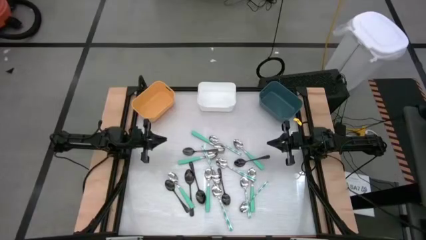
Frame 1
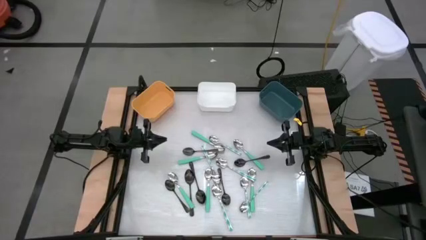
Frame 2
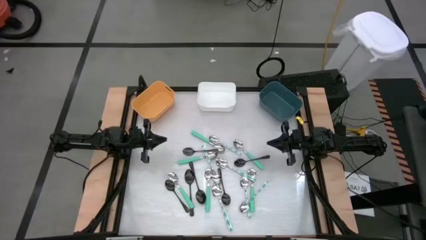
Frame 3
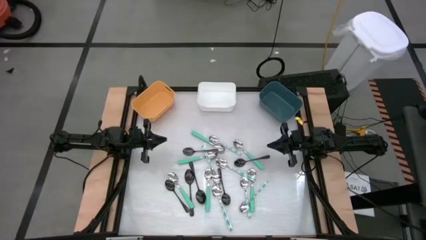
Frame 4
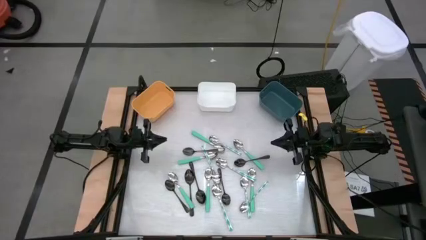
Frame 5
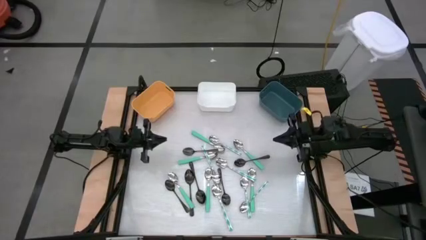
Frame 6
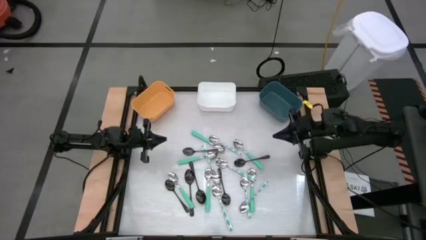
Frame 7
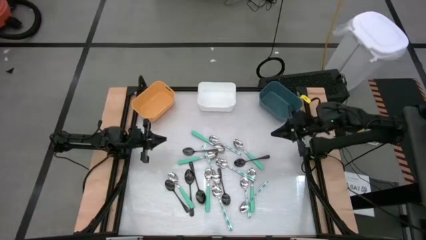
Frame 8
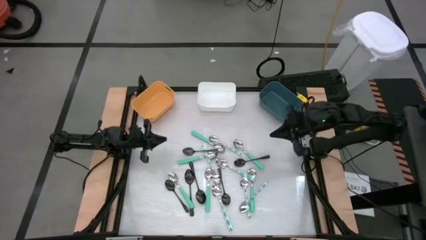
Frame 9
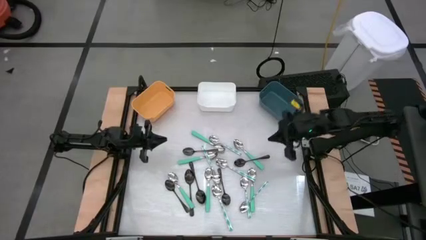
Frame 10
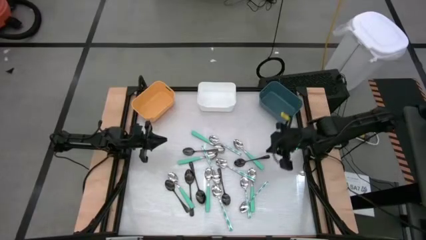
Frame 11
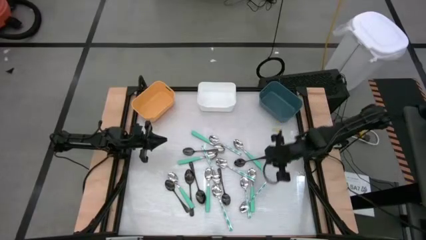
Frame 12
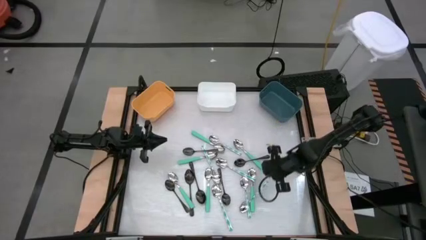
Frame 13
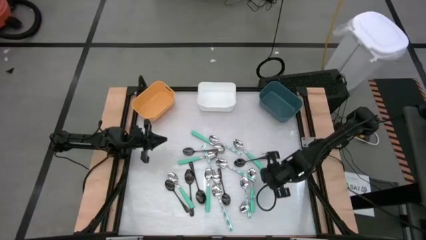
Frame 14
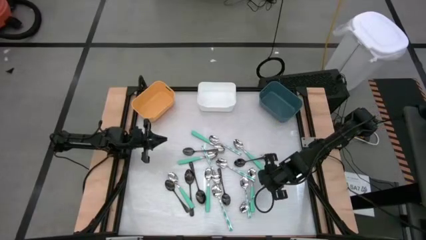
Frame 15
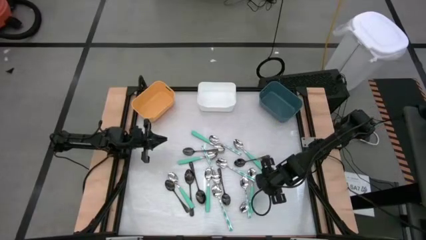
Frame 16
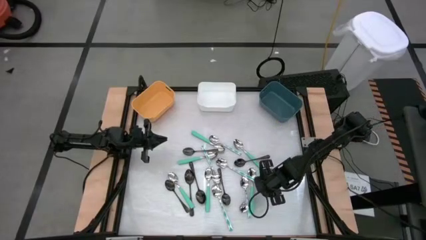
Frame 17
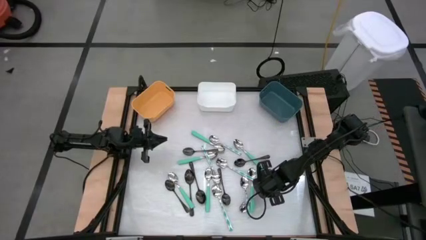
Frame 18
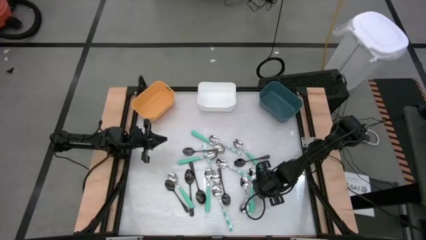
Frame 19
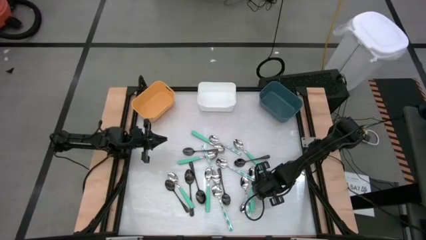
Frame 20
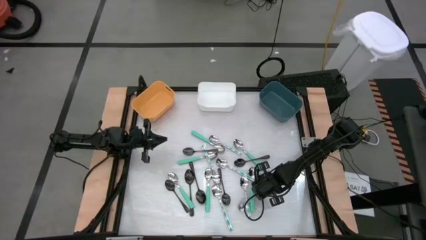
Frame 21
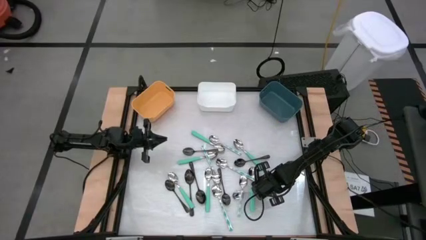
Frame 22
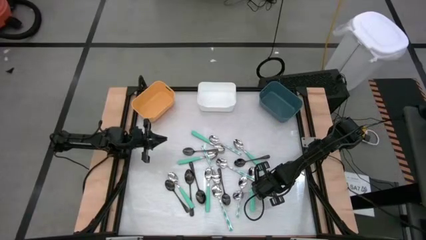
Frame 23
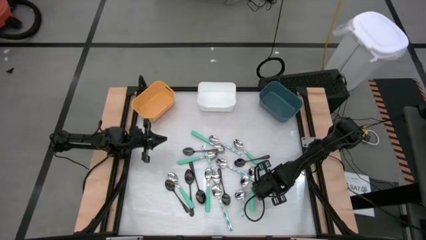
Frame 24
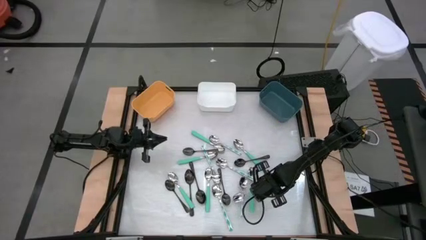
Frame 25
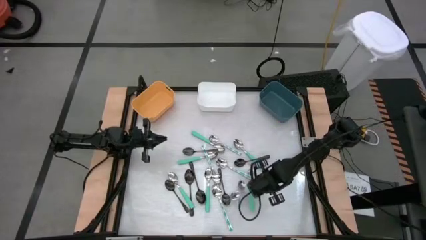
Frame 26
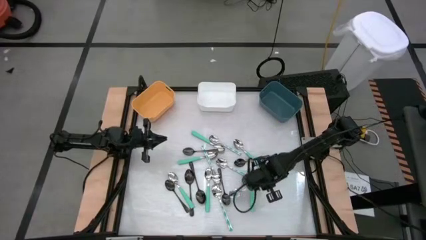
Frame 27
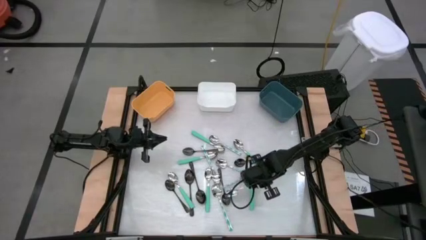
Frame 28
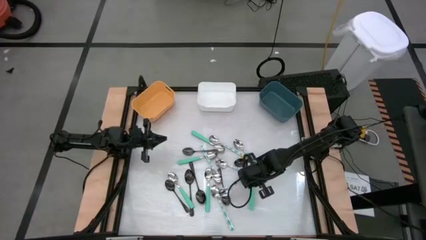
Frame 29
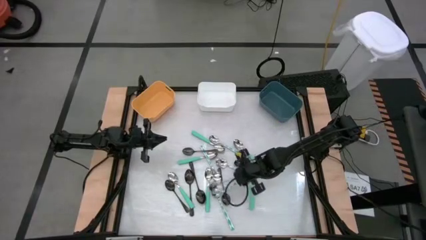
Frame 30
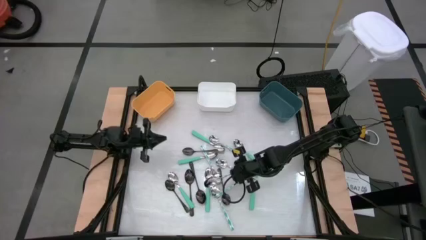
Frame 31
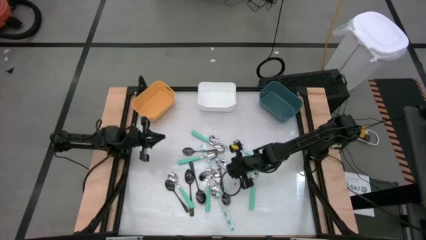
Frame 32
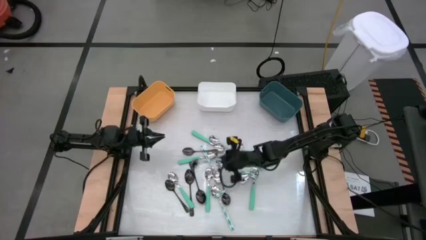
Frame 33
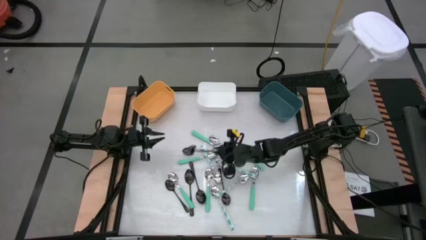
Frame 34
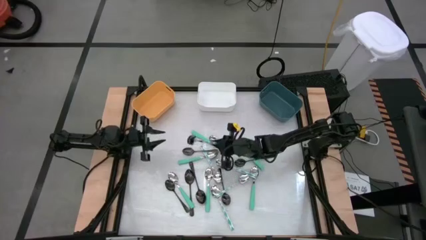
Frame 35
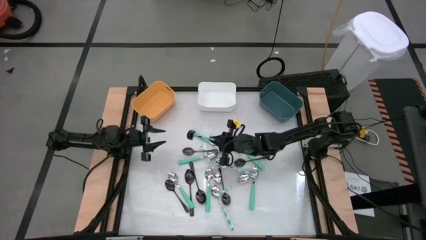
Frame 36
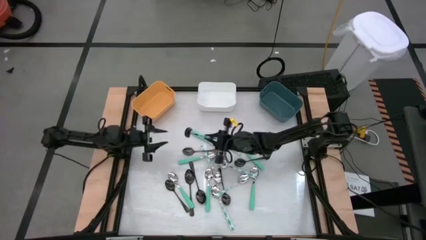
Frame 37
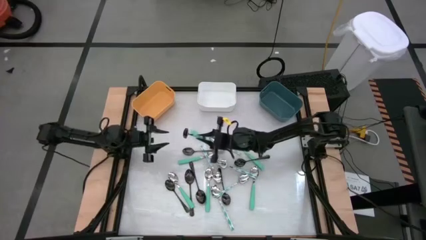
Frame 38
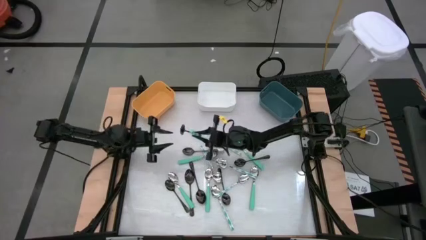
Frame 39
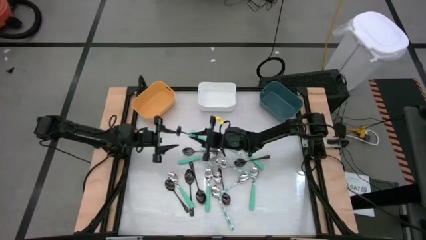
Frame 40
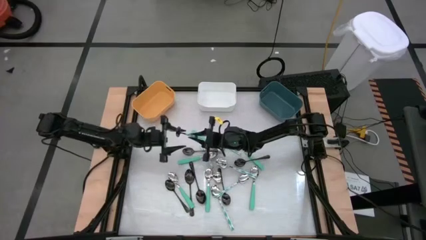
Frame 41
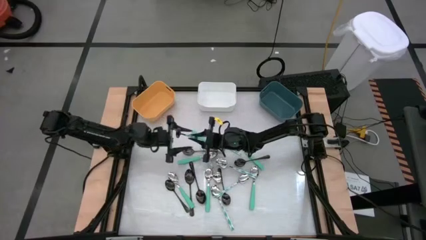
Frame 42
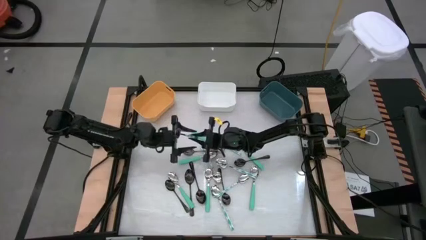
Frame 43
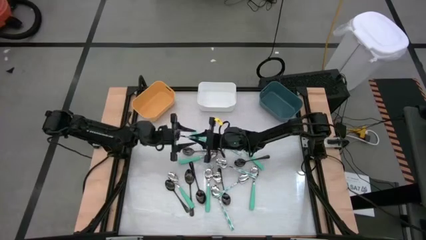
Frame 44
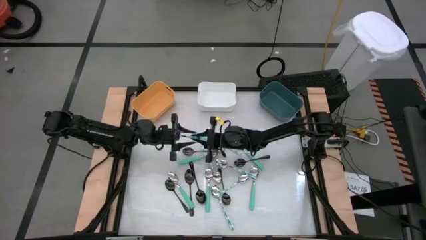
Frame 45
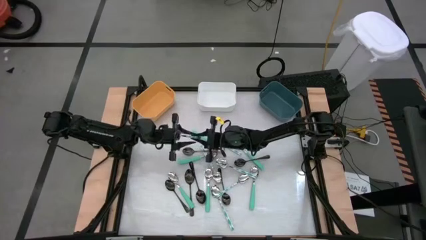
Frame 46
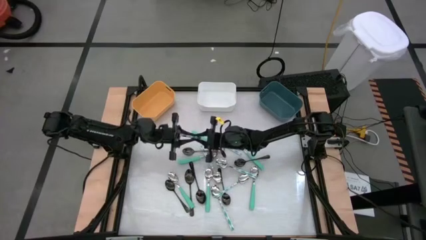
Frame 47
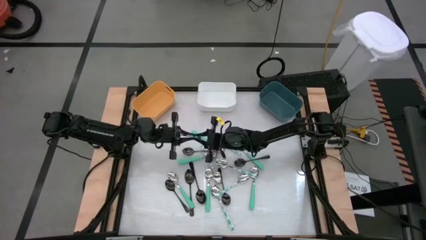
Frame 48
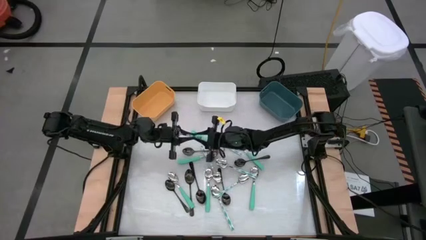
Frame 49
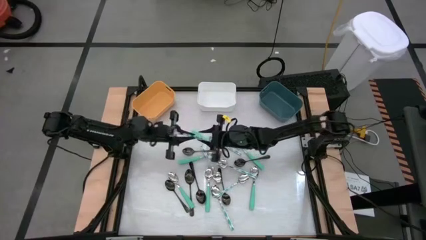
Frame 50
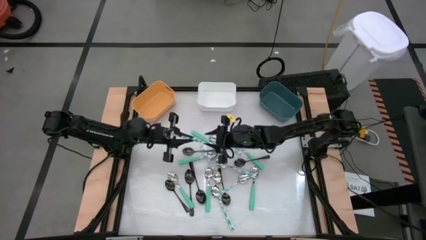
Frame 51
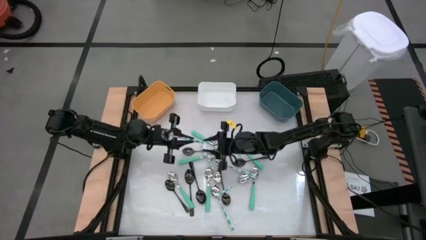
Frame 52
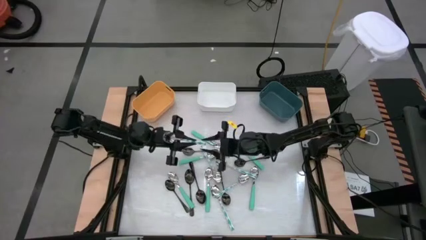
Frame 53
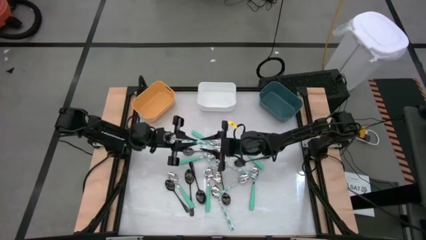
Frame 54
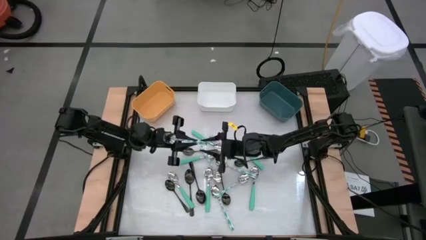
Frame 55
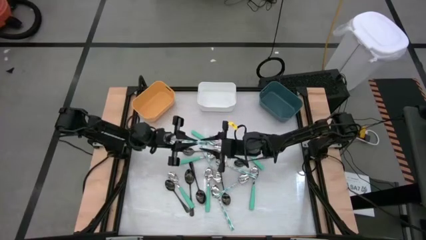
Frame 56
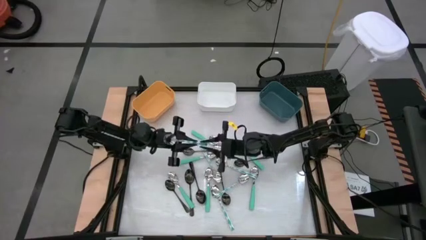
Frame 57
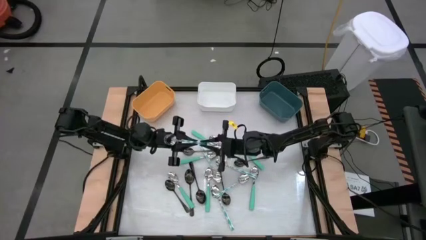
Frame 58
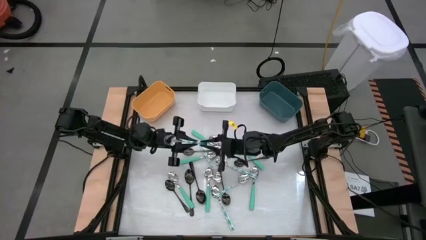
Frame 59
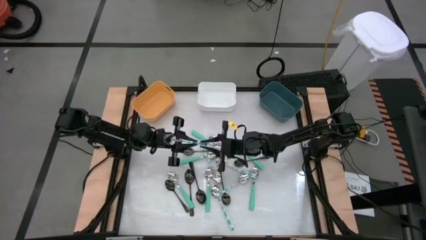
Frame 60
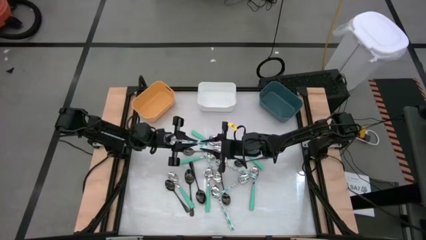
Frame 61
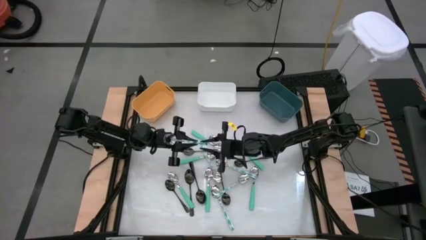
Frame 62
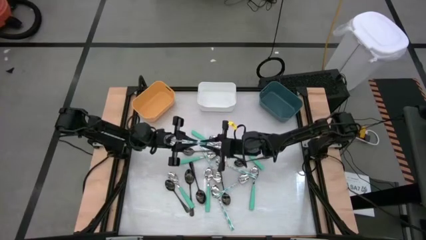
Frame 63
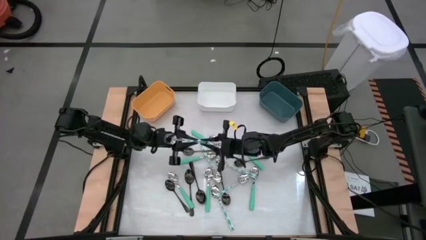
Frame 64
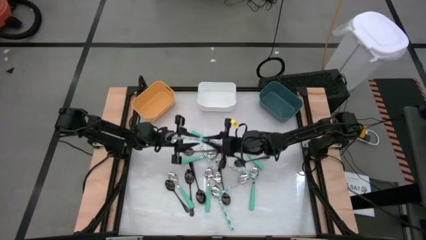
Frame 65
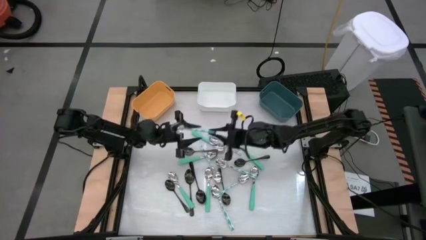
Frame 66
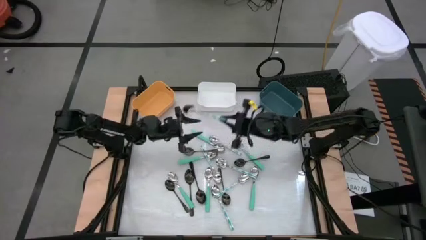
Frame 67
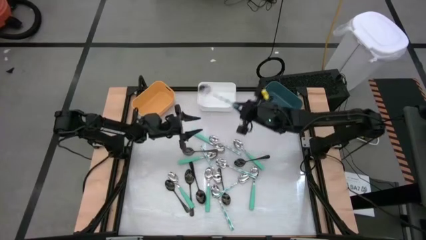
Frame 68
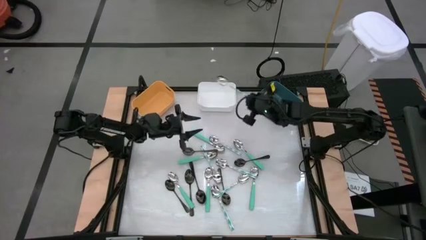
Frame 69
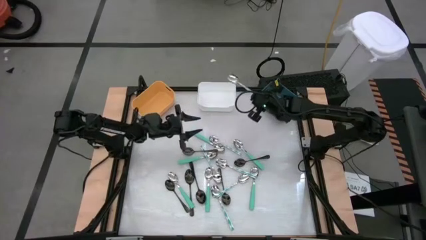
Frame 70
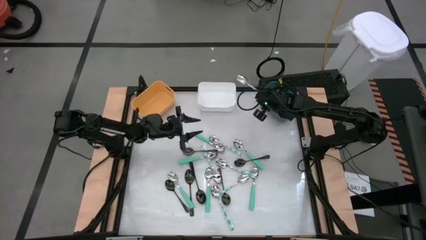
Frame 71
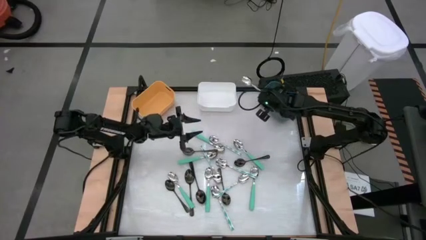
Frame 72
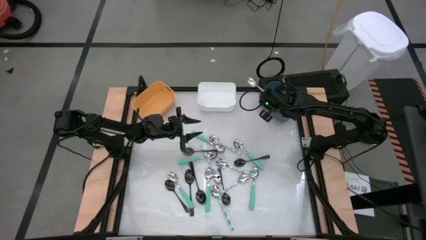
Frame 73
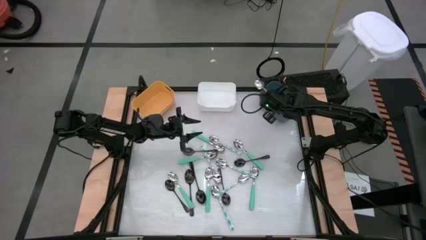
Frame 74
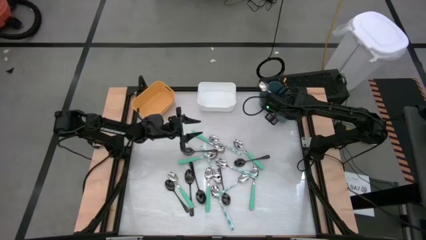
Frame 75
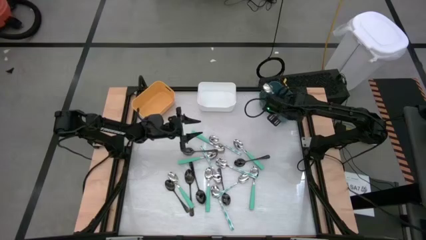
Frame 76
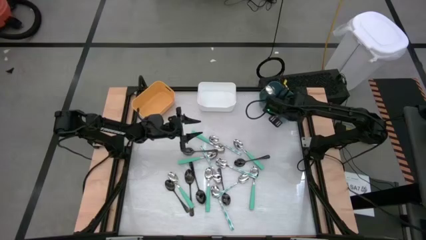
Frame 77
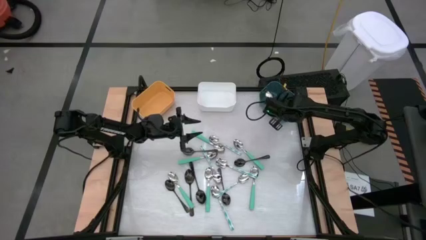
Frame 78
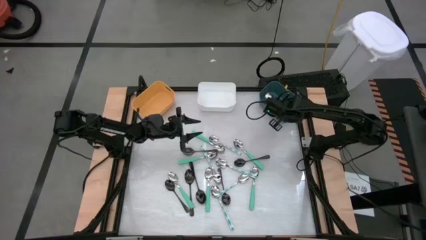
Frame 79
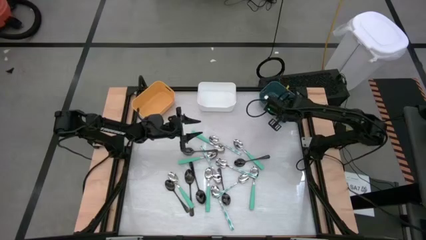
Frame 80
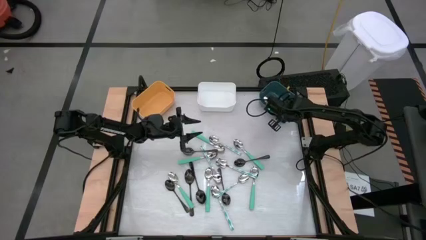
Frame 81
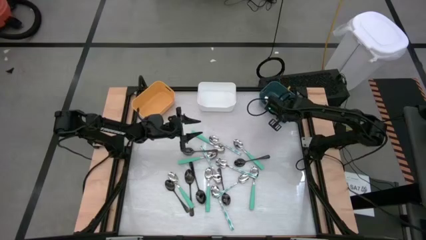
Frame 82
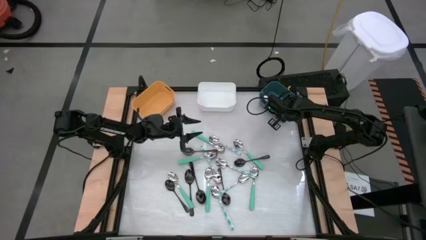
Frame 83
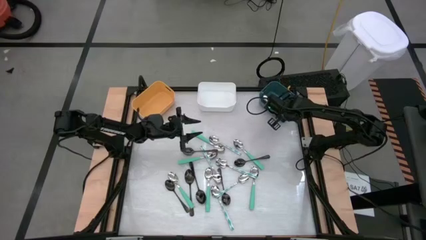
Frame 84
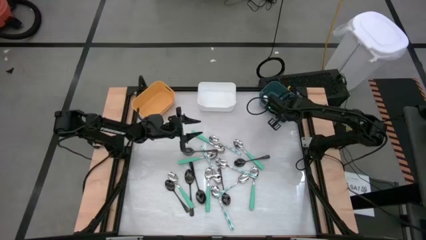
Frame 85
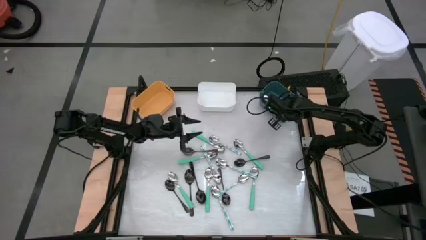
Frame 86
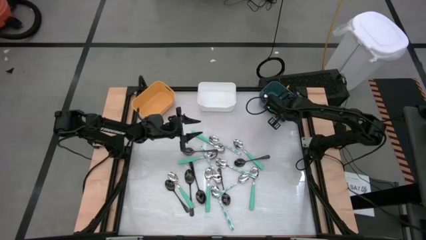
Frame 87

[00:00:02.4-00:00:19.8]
Task: Sort silverware by color (type)
Put the blue patterned spoon into the blue bin
